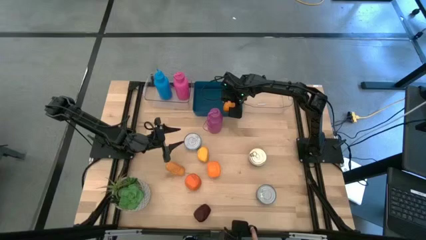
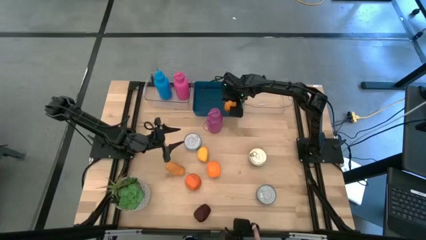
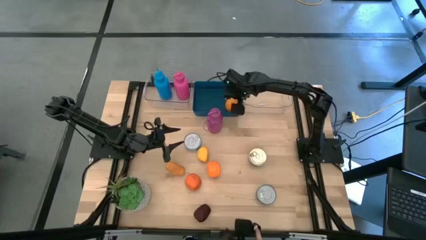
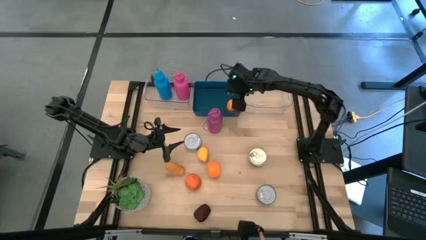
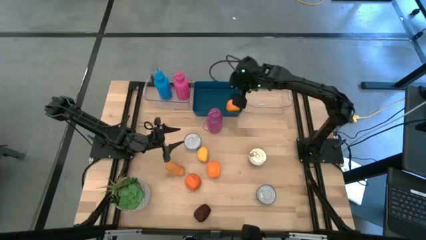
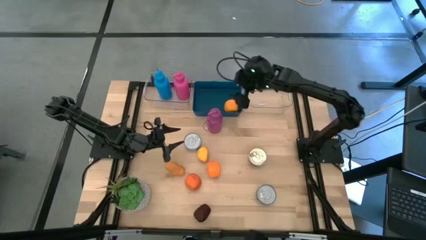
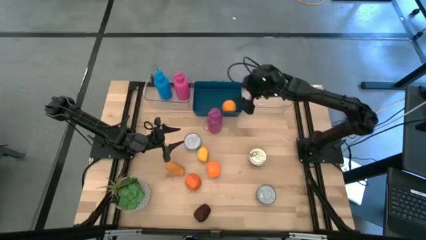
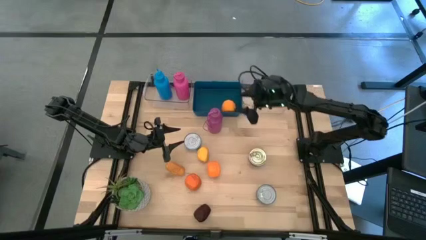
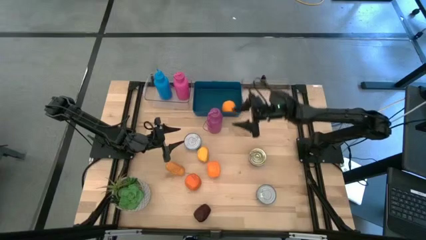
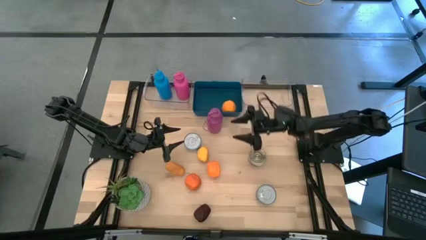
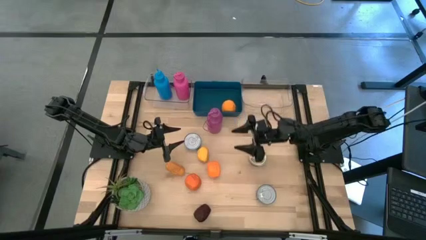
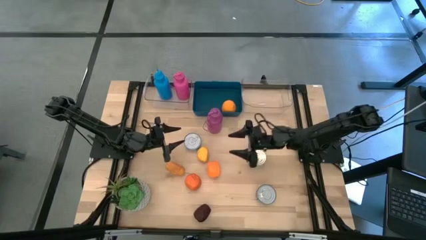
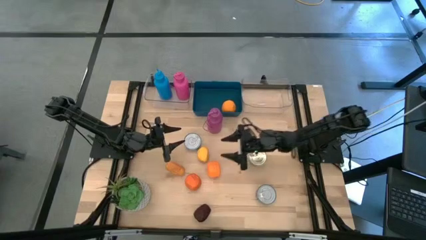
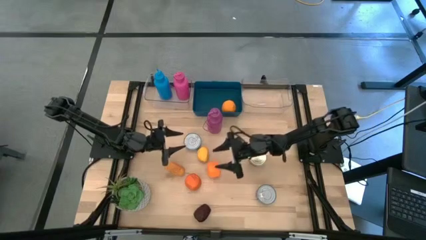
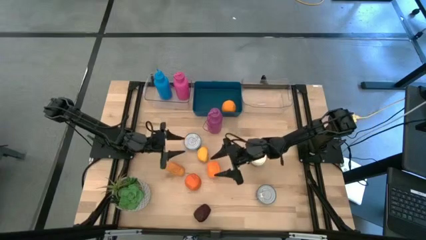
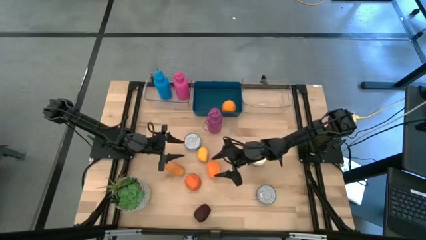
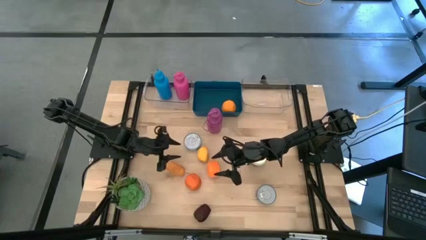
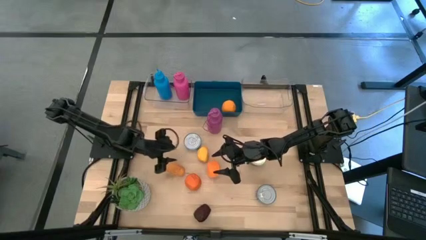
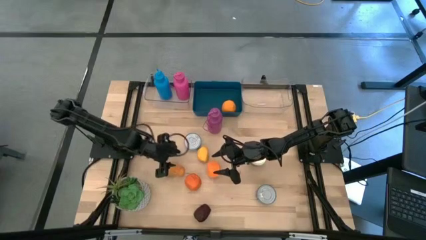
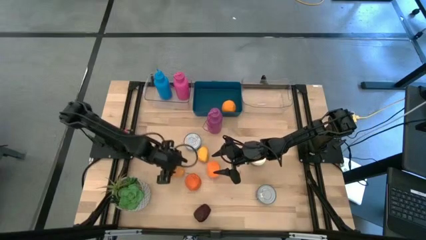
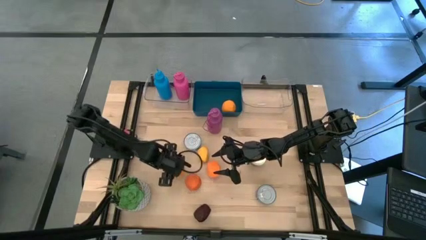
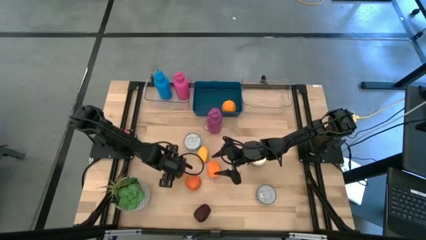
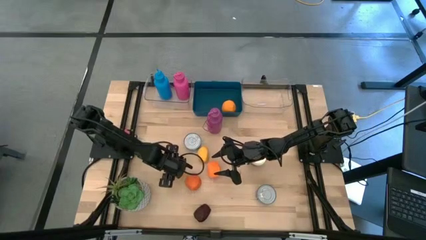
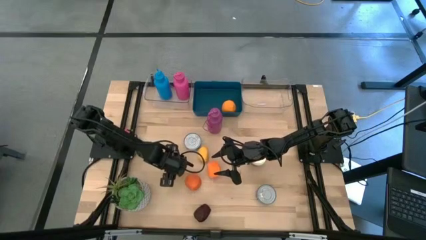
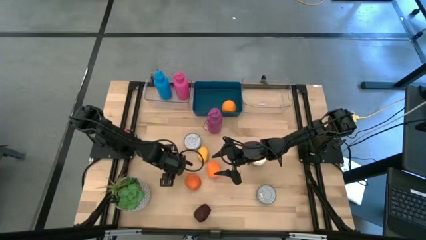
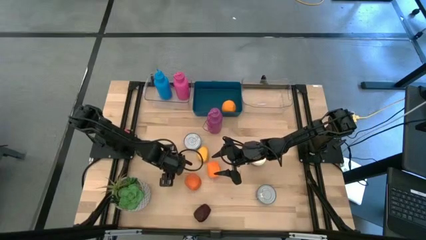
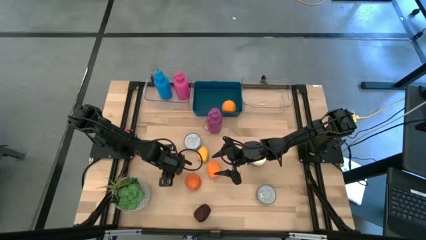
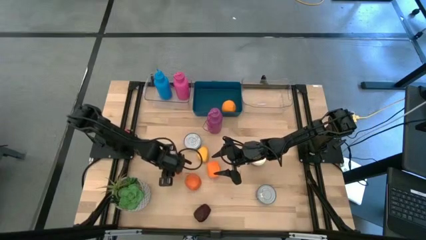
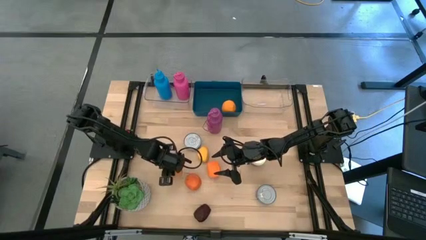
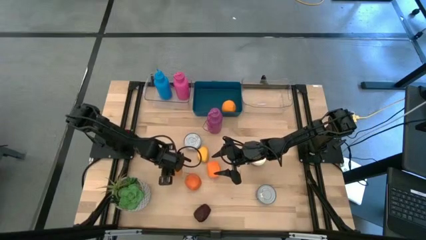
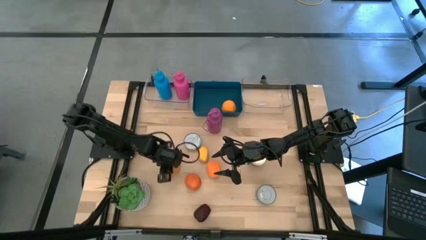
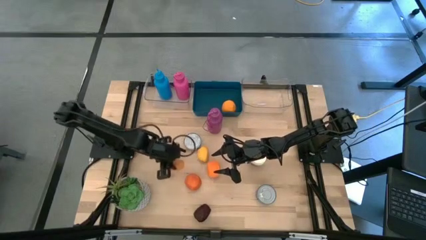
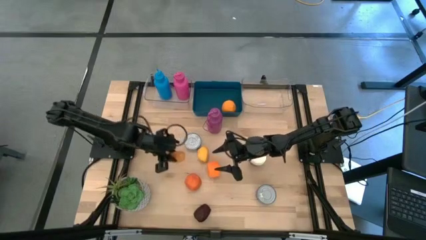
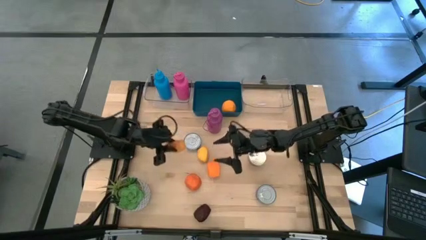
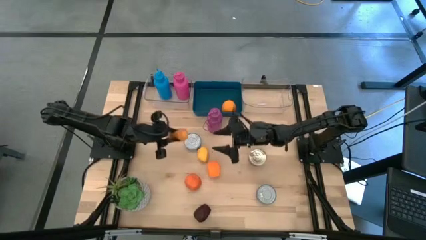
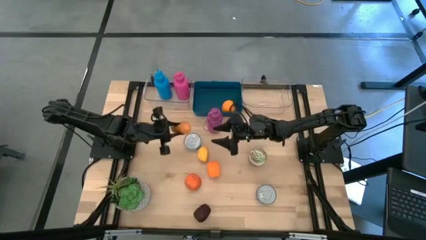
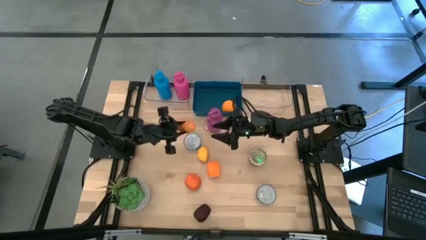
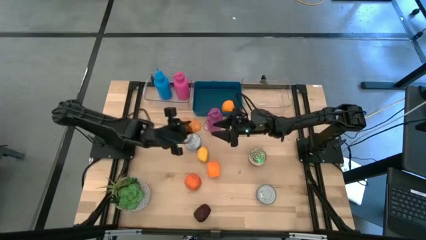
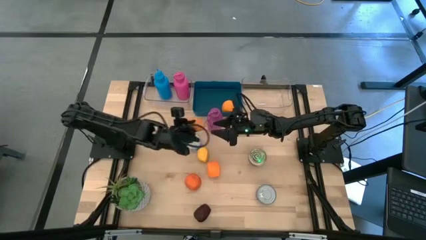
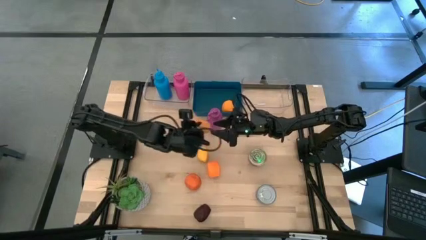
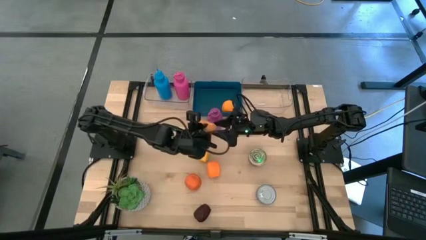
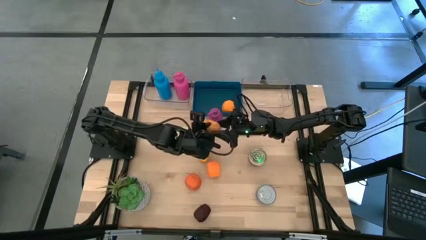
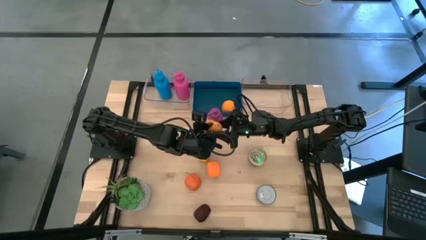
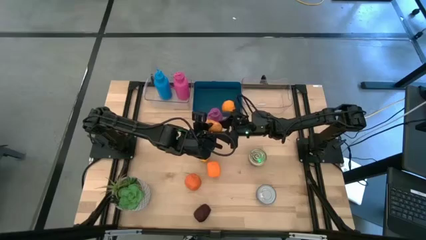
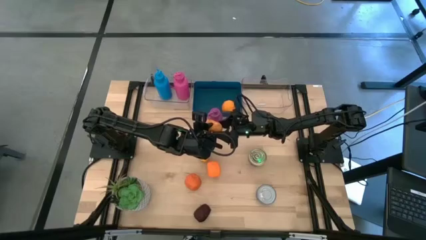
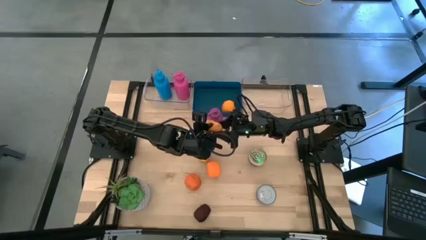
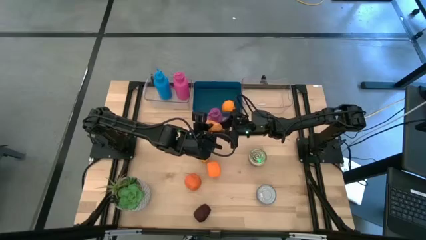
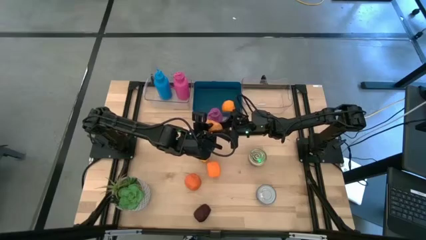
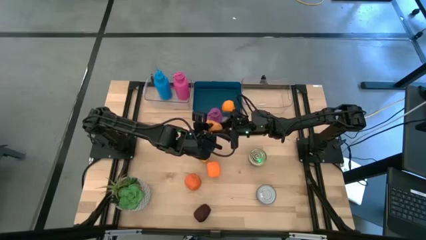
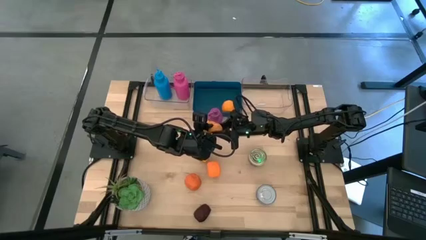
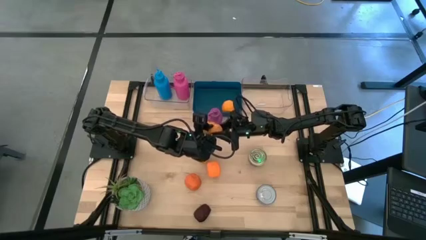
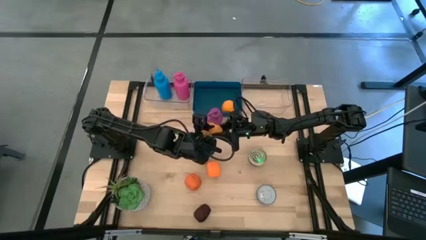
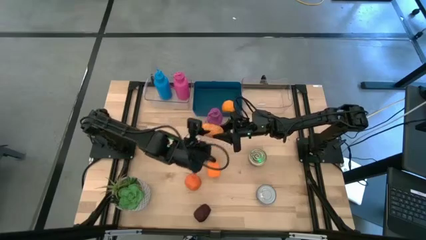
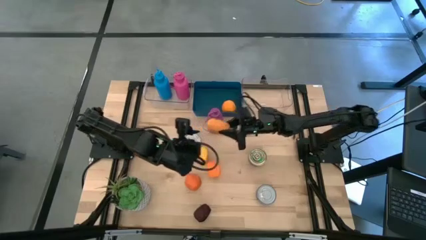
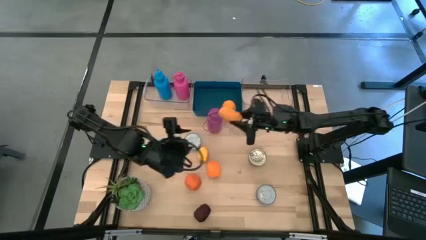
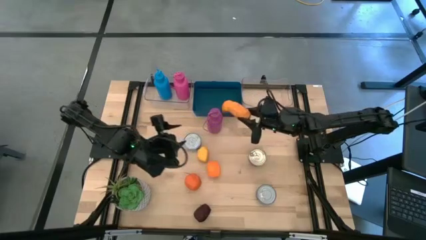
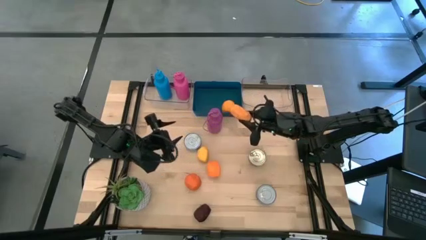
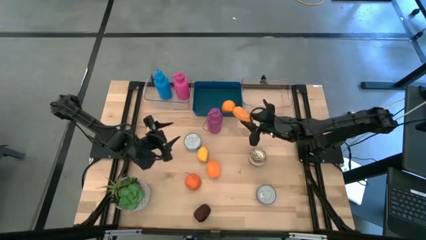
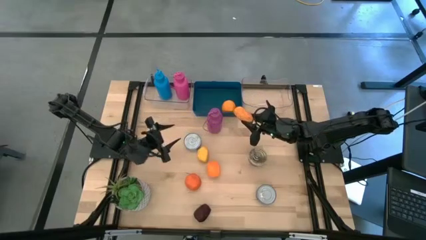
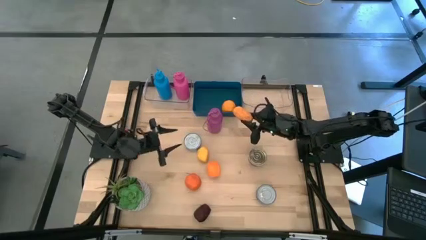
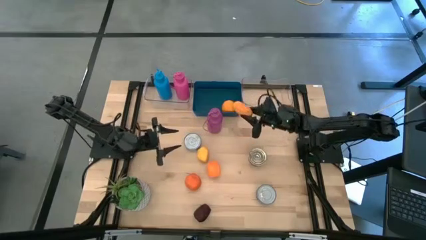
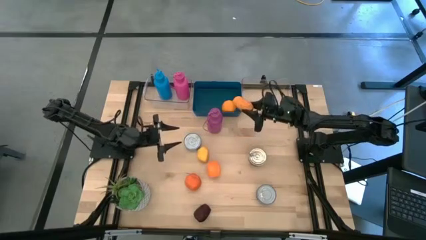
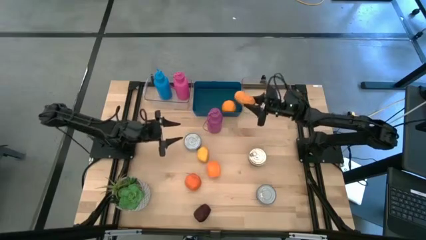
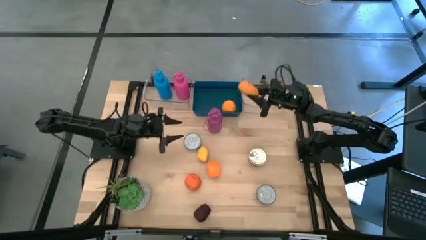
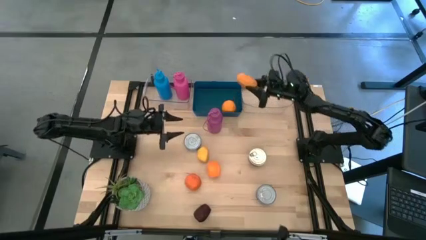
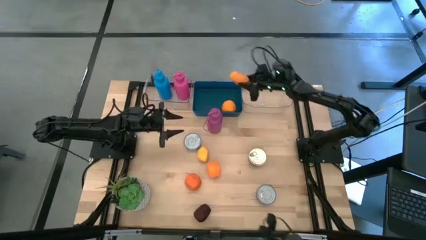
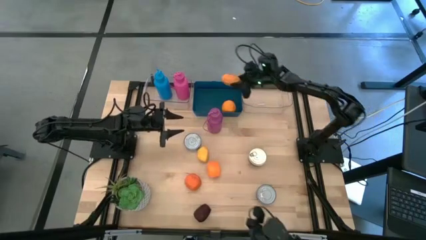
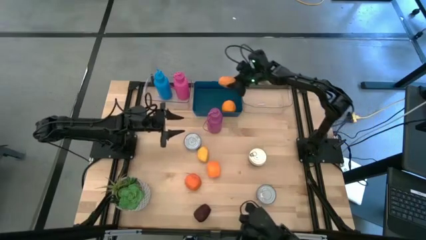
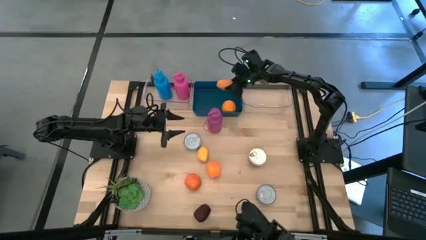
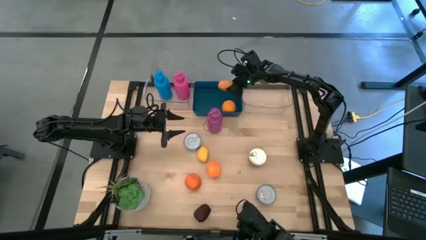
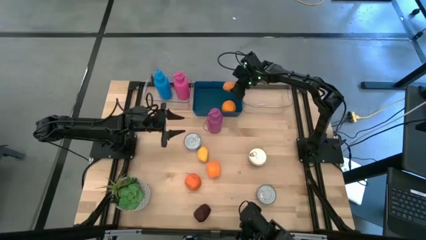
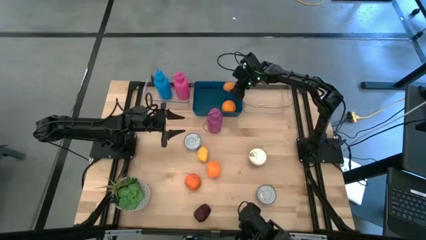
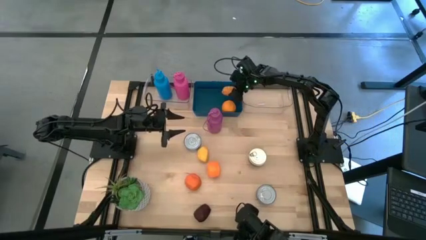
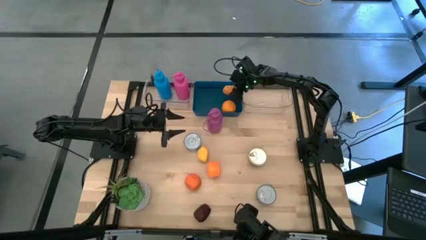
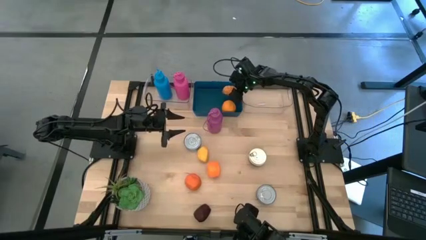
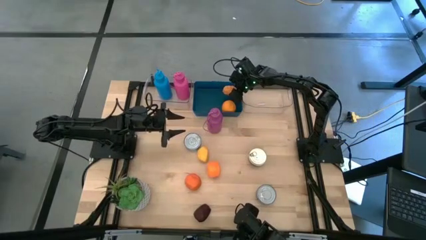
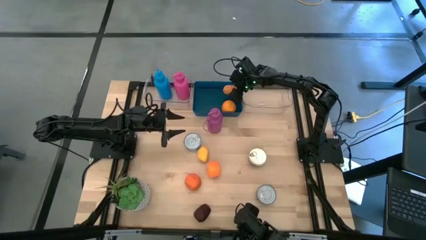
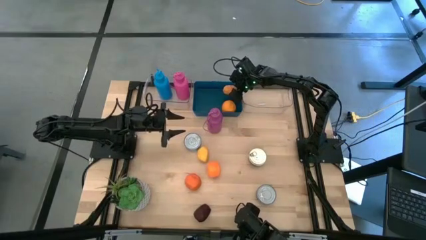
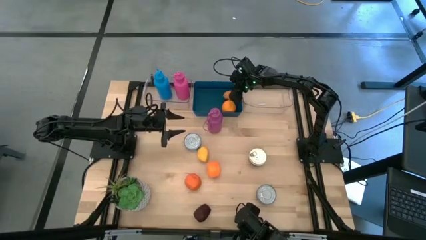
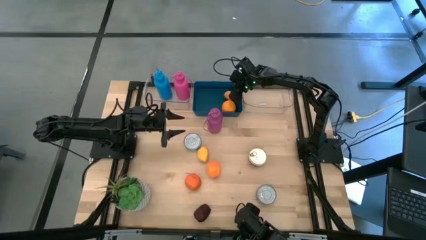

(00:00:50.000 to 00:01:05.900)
Task: Pick & Place Food Item
Put the left mango into the blue bin
